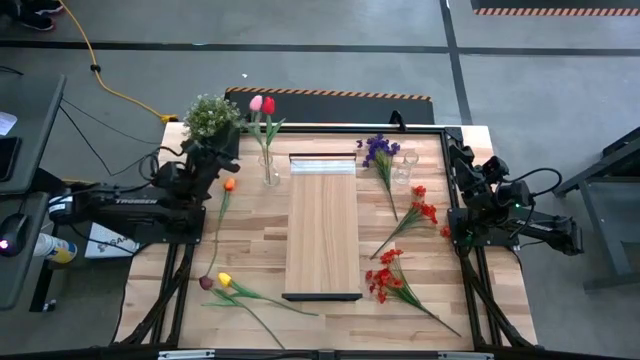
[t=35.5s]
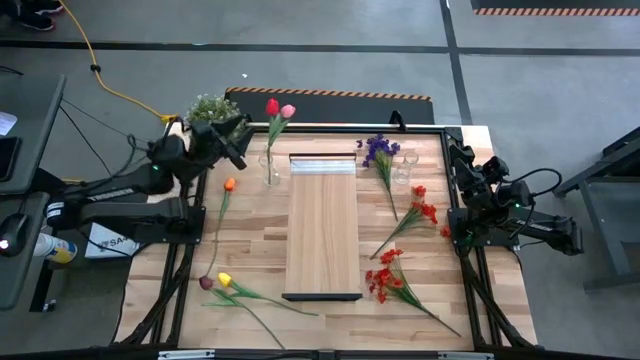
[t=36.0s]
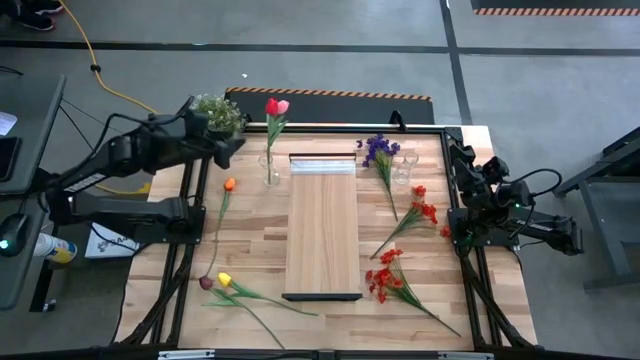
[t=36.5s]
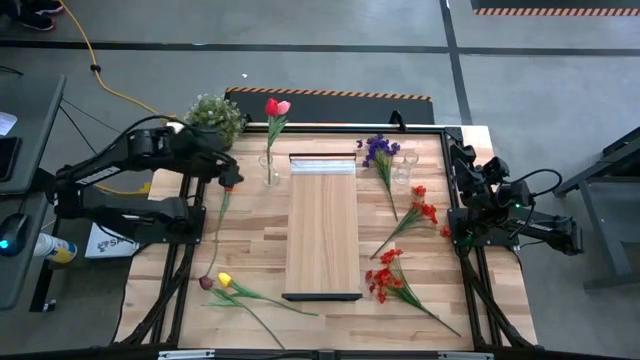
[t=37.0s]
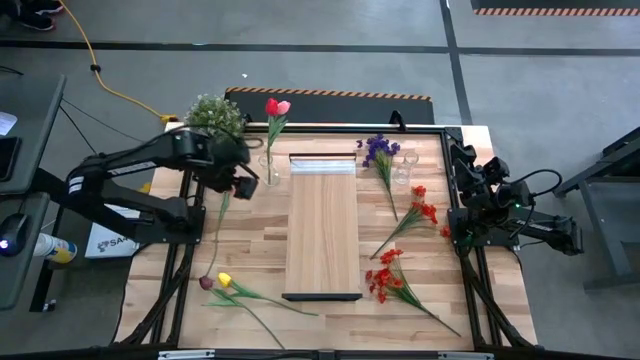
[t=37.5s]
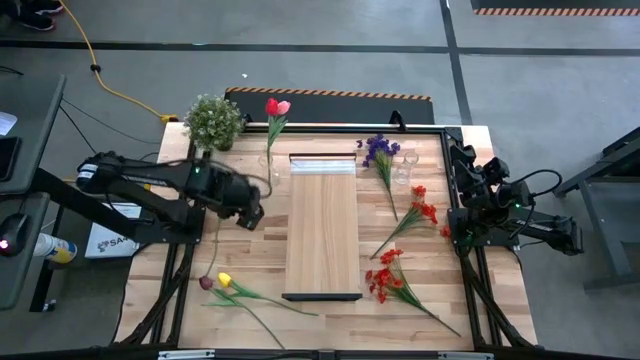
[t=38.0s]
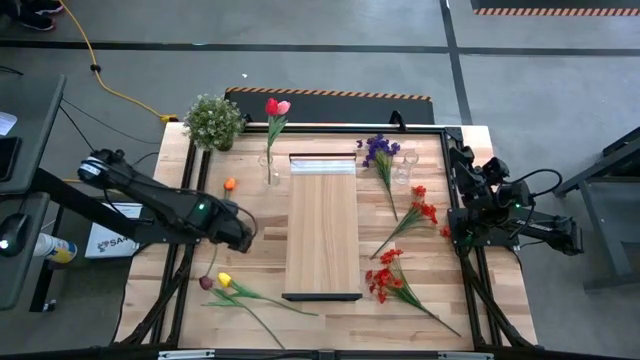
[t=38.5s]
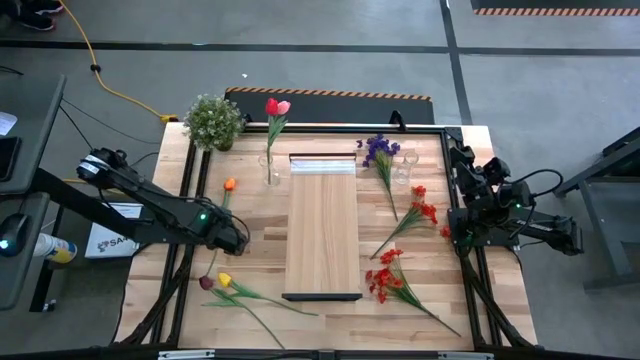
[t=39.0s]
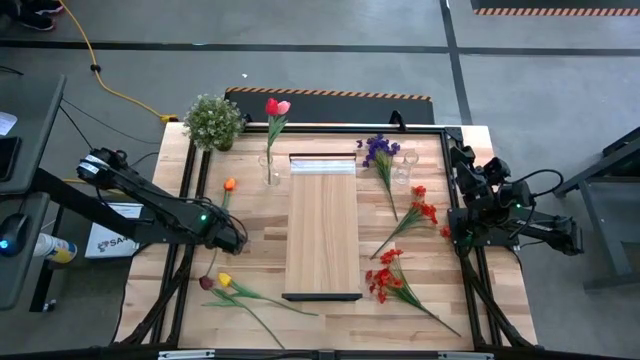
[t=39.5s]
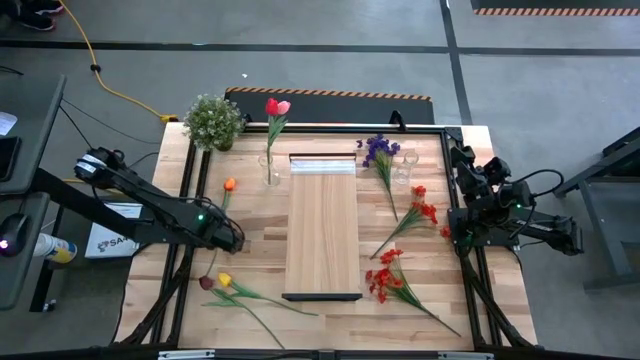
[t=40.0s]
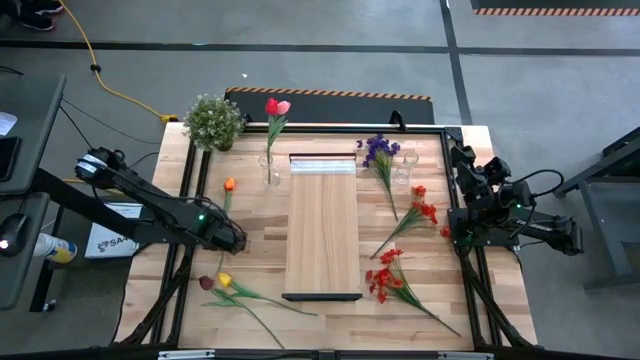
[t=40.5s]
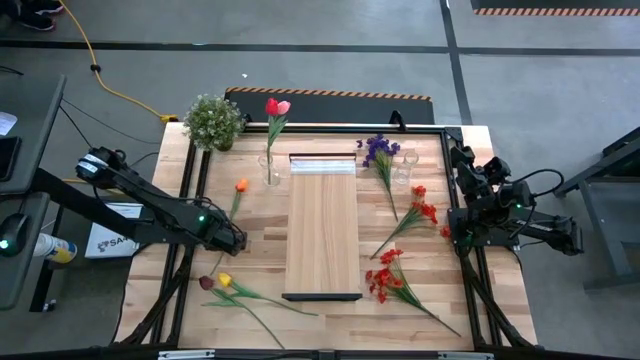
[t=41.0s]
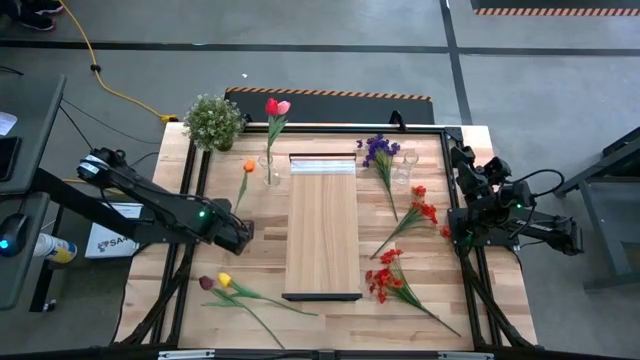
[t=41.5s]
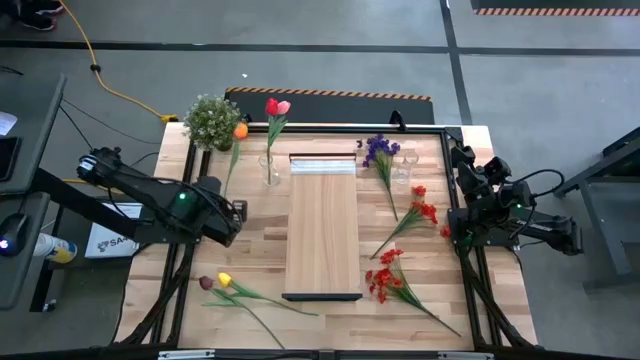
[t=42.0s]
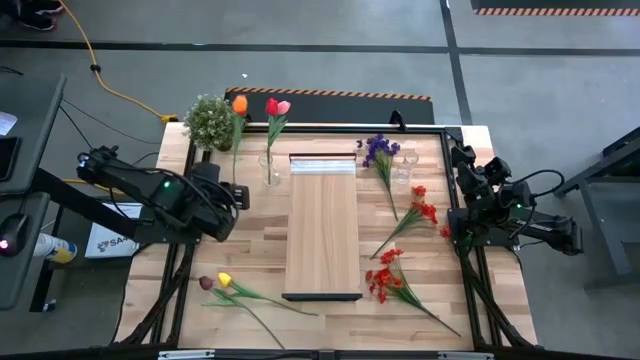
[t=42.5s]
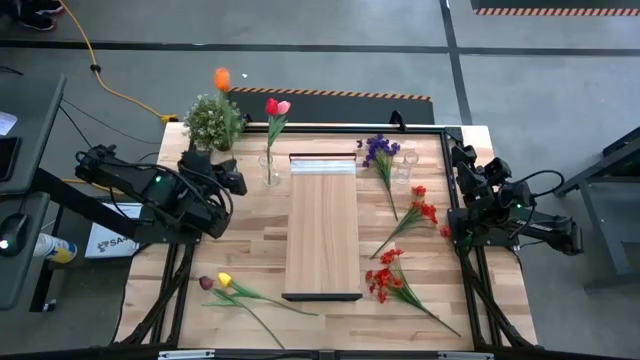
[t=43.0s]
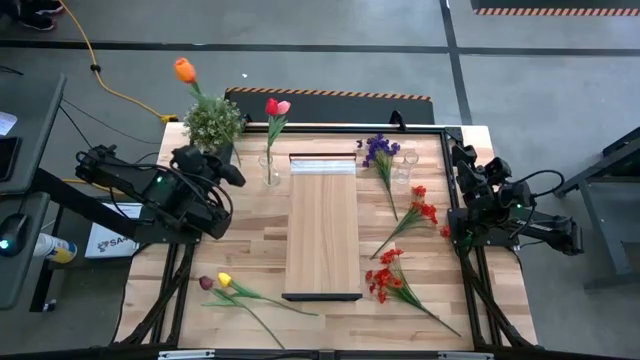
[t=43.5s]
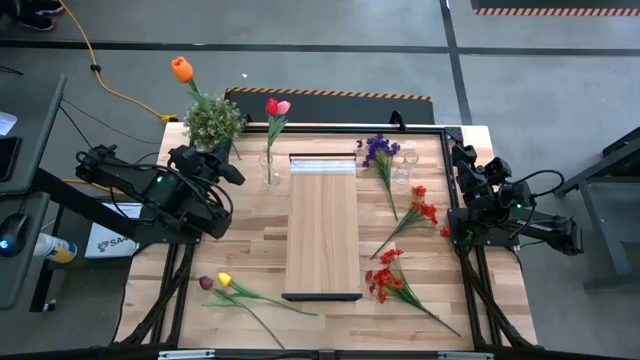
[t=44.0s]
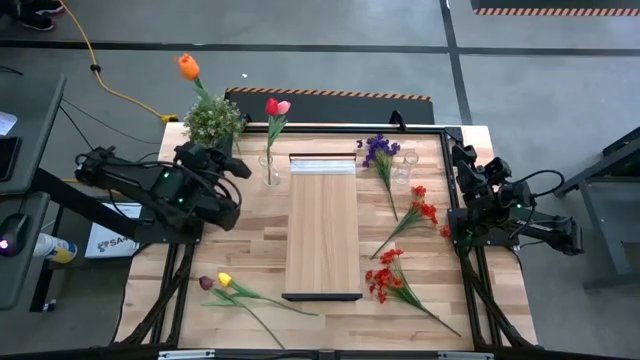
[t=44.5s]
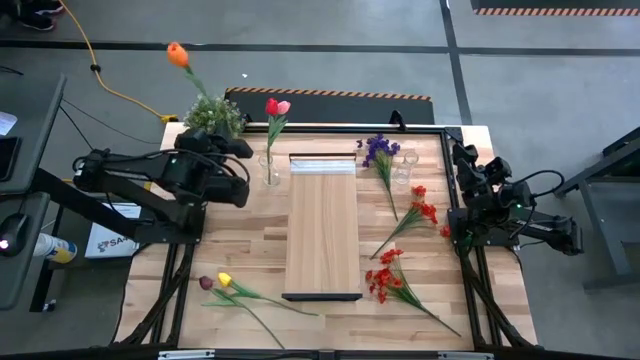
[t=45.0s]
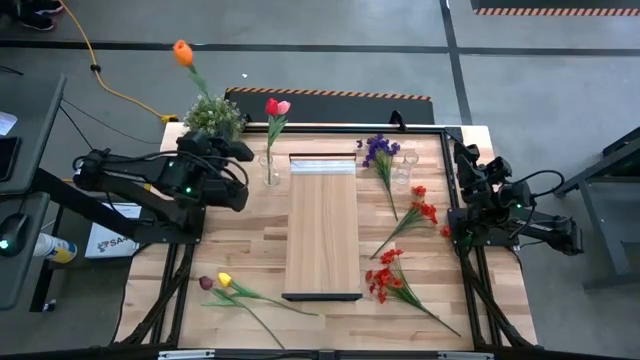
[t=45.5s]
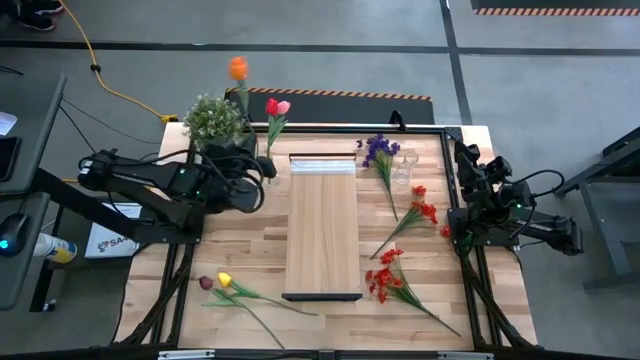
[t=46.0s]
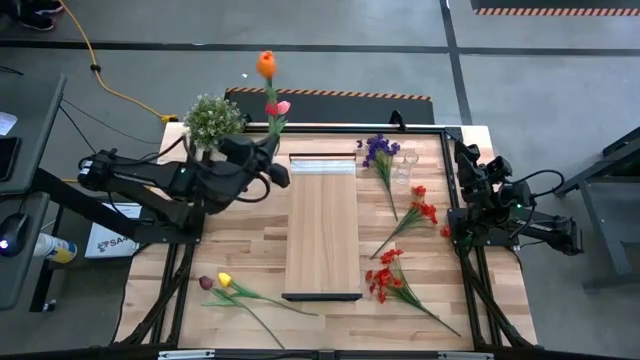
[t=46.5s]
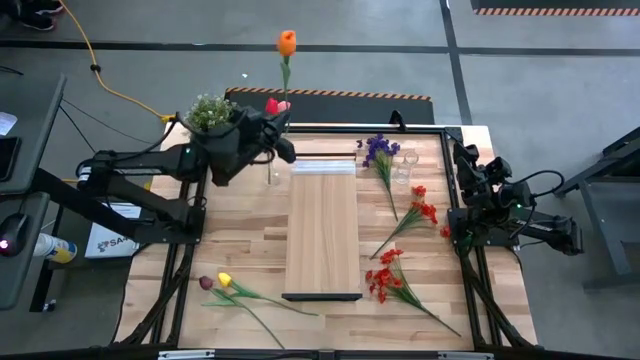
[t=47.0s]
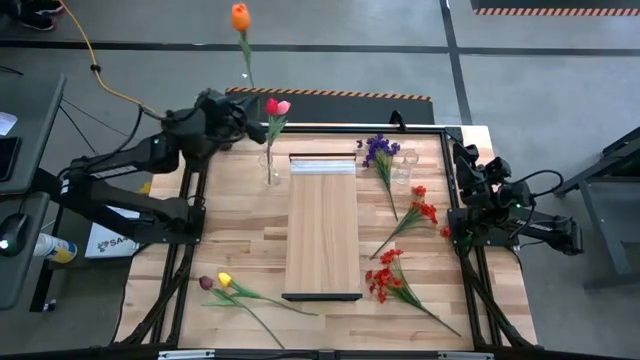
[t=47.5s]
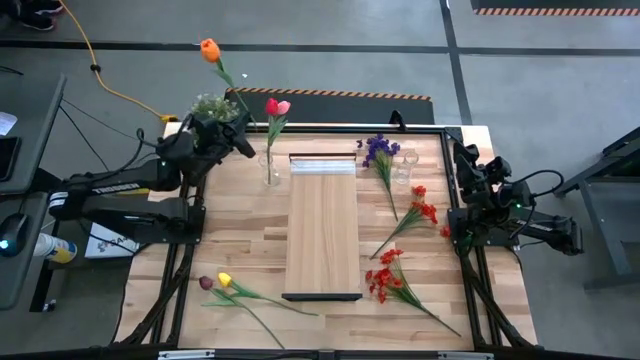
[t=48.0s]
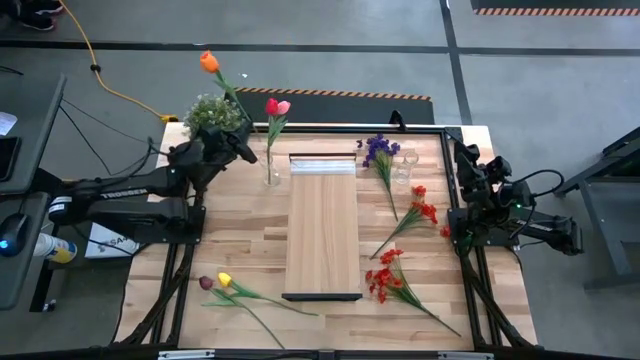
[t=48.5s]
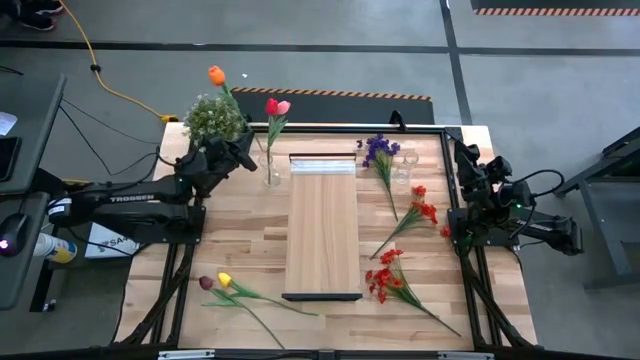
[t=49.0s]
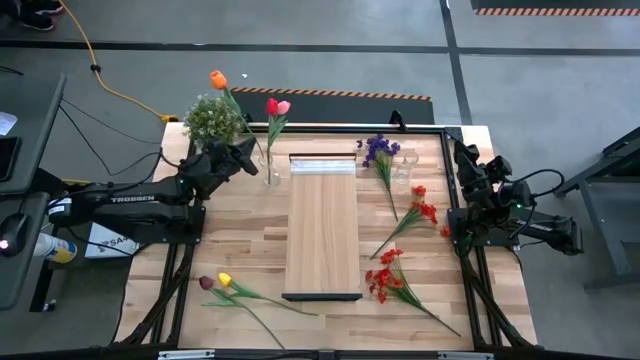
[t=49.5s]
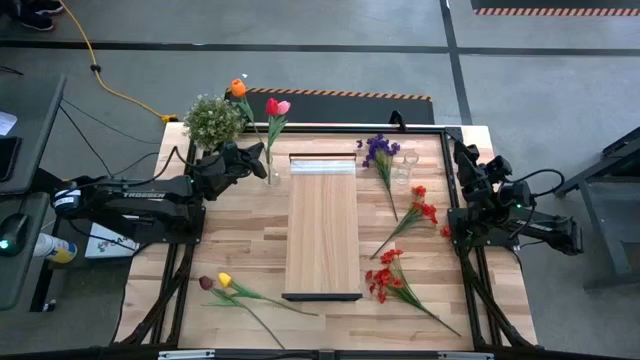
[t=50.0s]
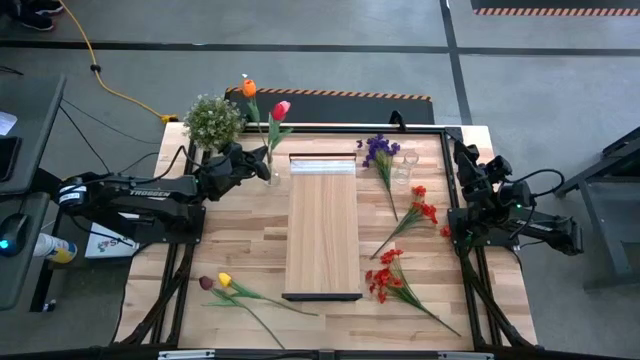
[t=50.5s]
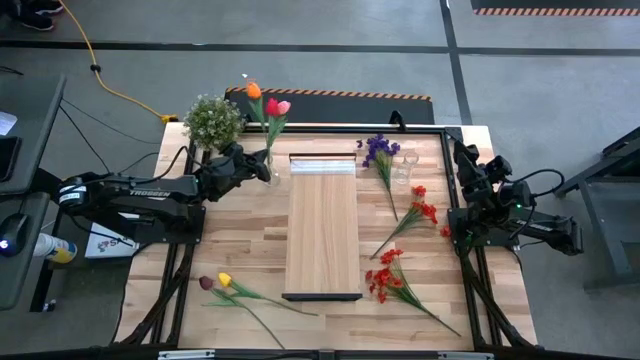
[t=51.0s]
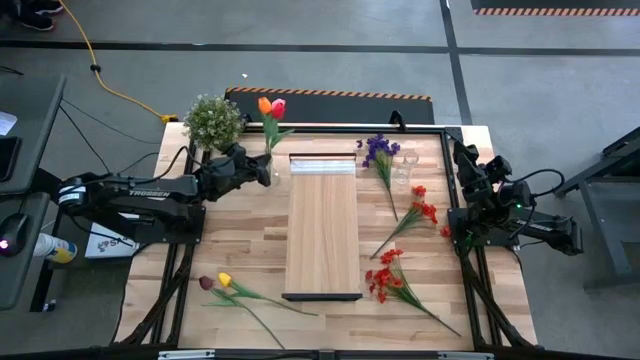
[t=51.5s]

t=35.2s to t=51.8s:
Task: Pick and place flowers into a vace then onto a shelf
Put the orange flower into the left transparent vase

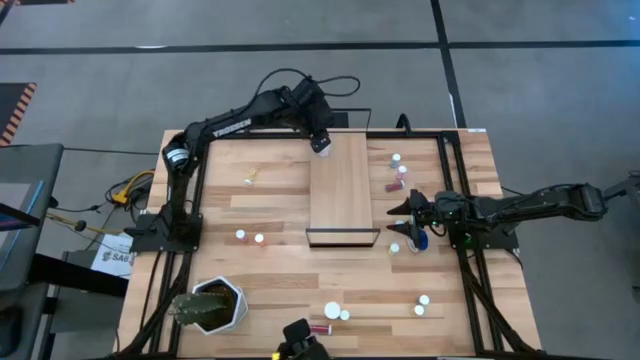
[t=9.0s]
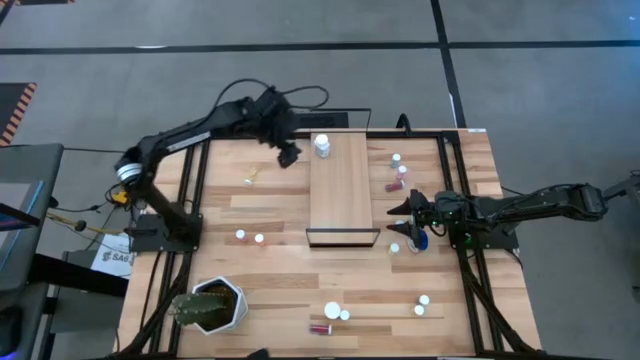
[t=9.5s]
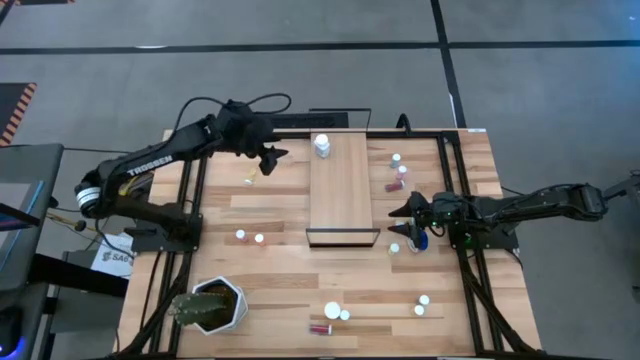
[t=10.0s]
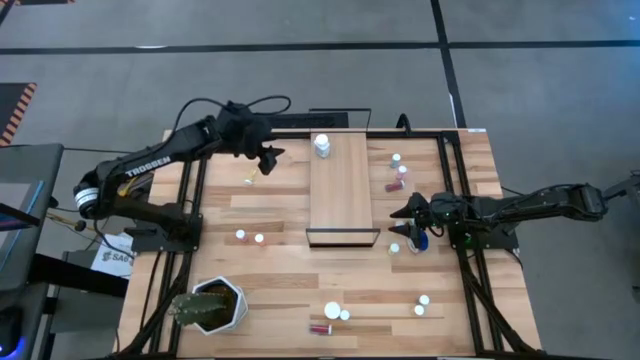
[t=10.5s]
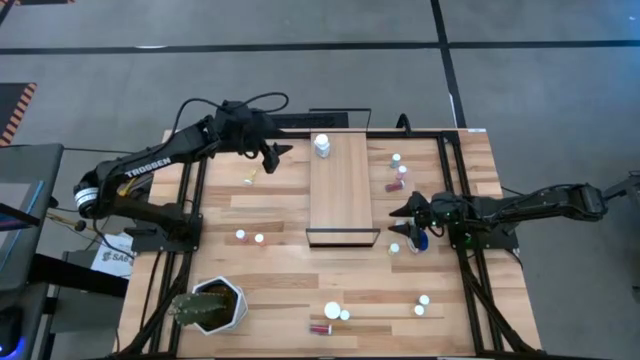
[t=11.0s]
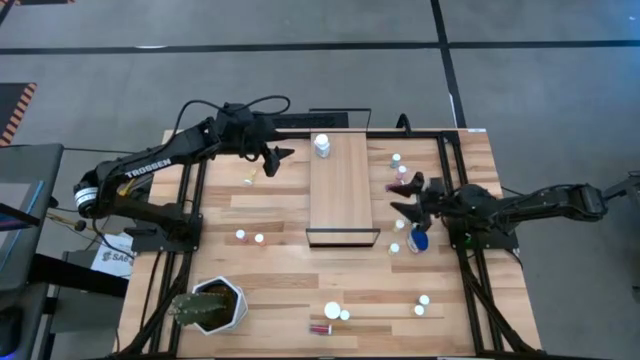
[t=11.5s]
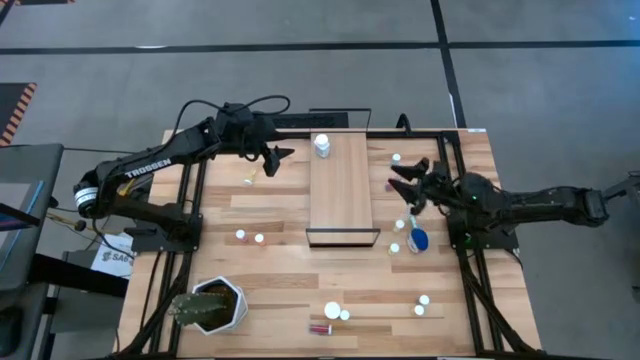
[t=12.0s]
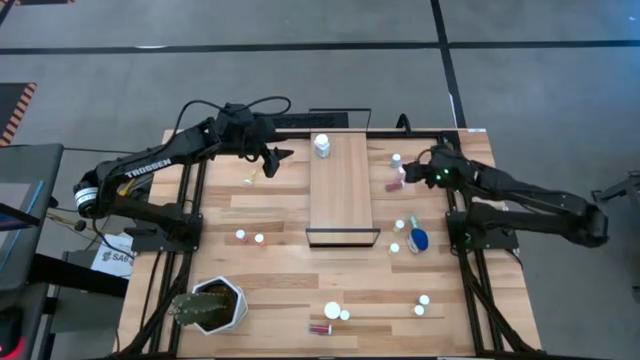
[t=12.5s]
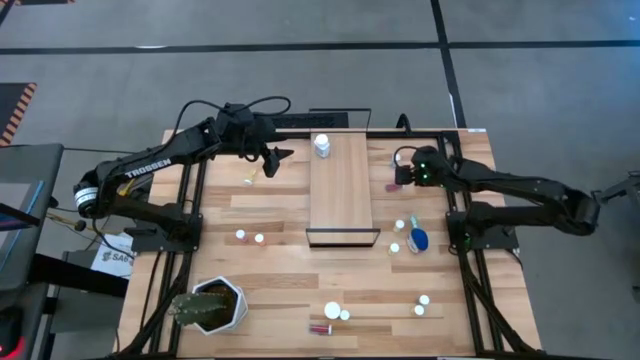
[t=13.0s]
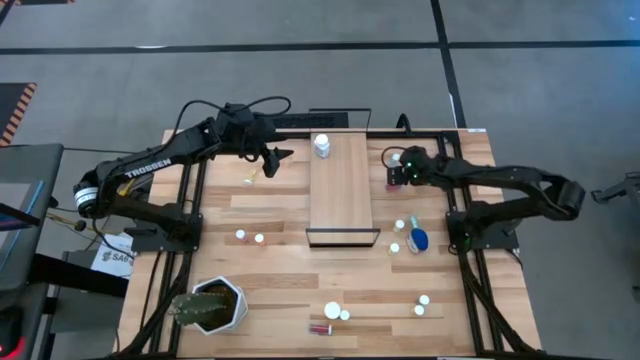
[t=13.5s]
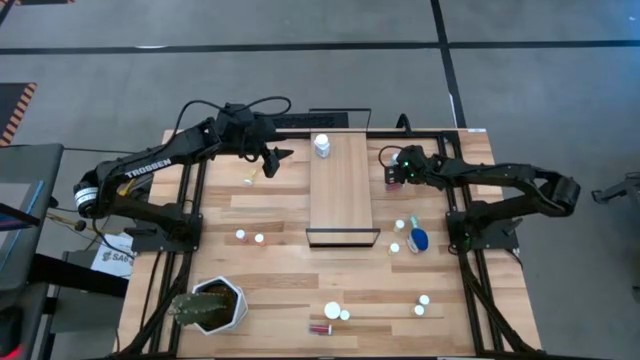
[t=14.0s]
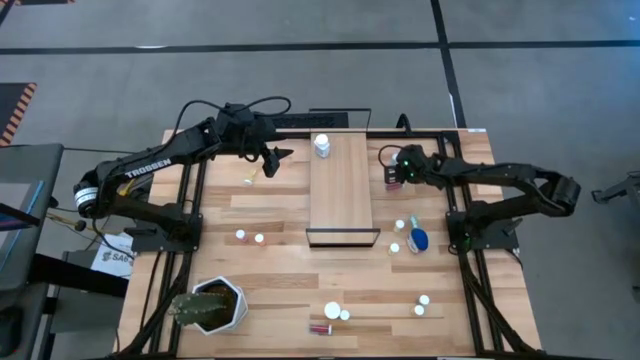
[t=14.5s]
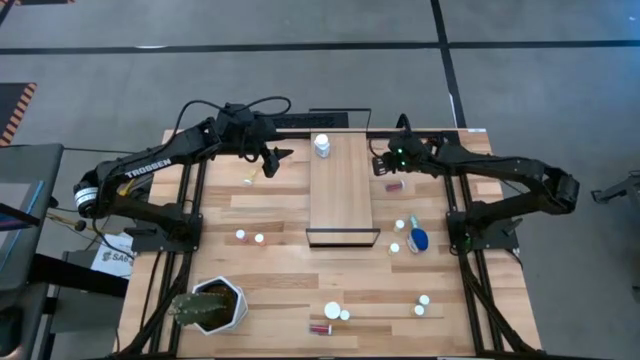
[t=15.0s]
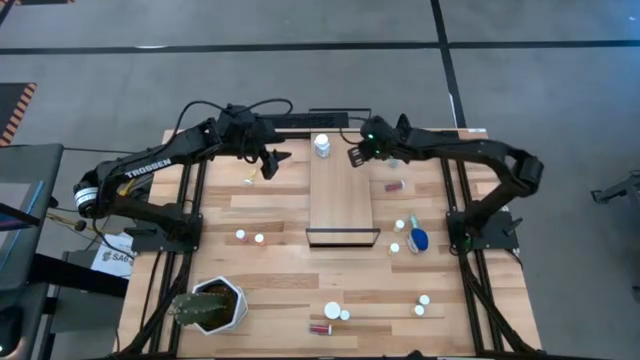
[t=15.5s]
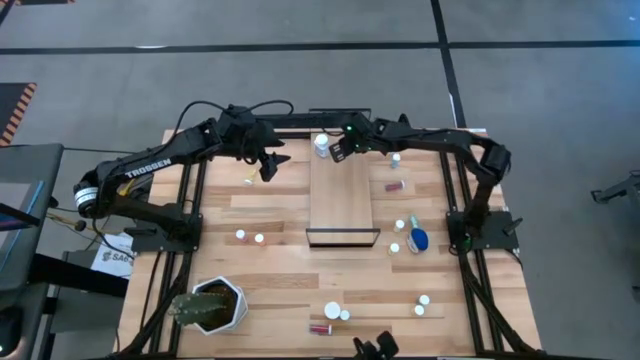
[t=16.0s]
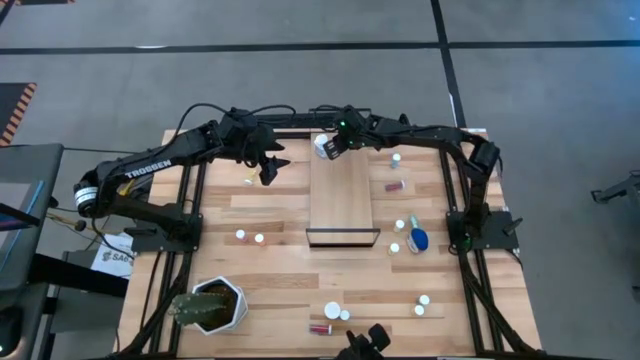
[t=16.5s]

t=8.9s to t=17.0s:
Task: Pick and place medicine bottles onto shelf by color
Put the pink pill bottle on the shelf
